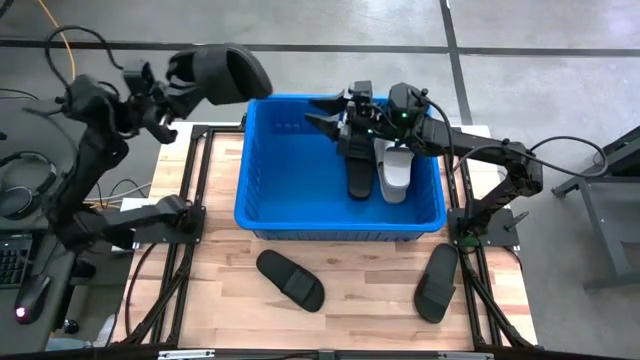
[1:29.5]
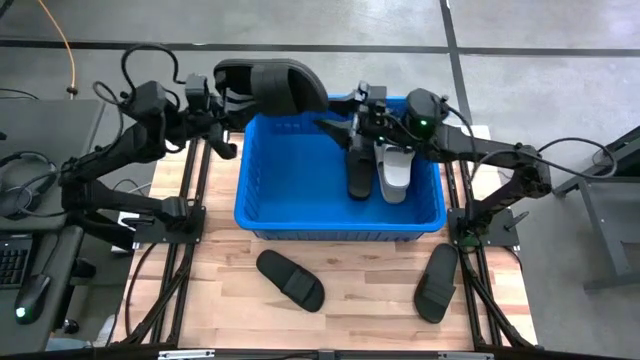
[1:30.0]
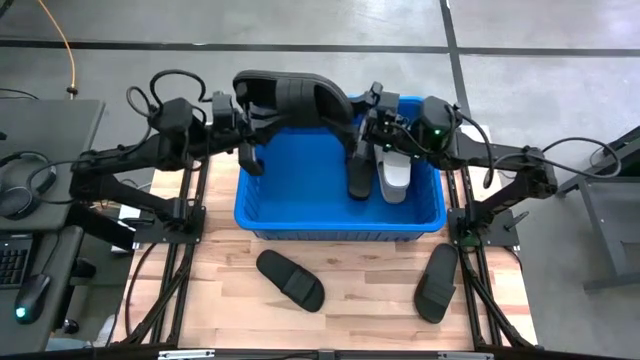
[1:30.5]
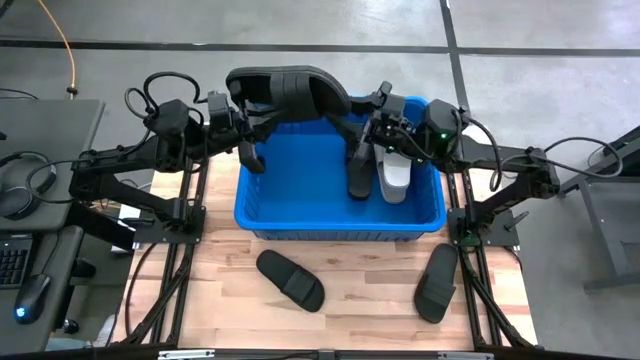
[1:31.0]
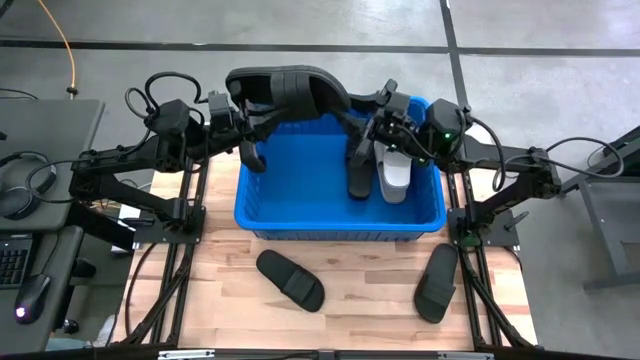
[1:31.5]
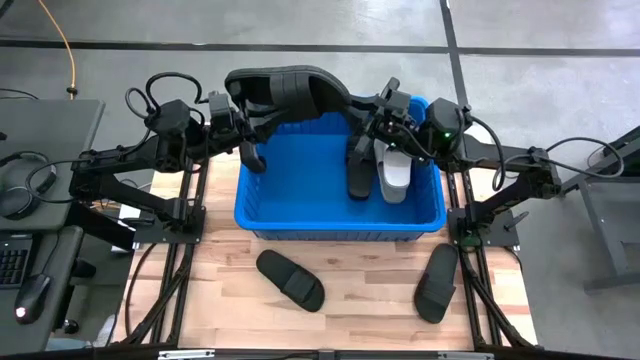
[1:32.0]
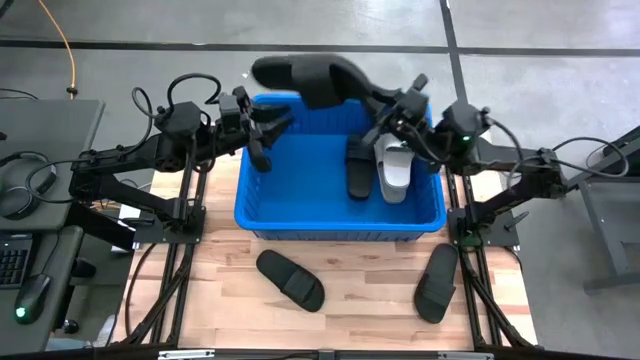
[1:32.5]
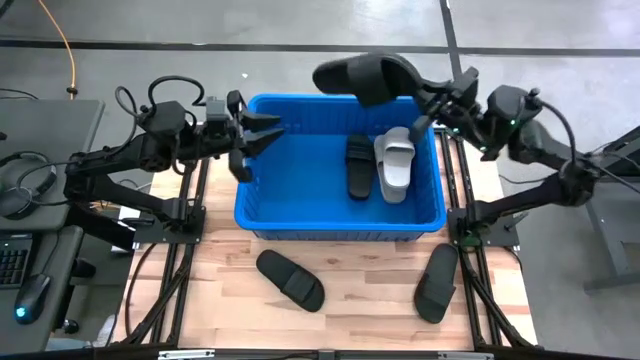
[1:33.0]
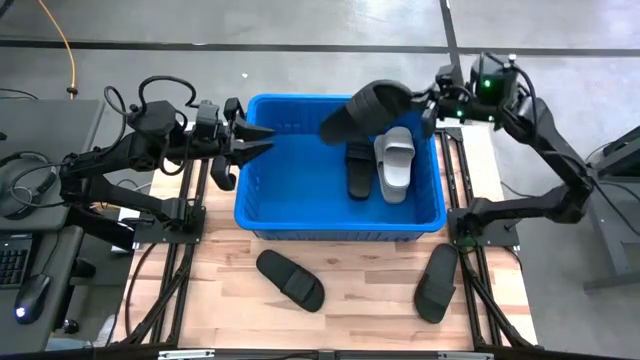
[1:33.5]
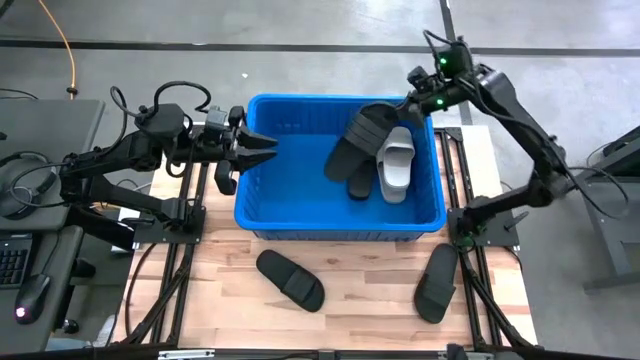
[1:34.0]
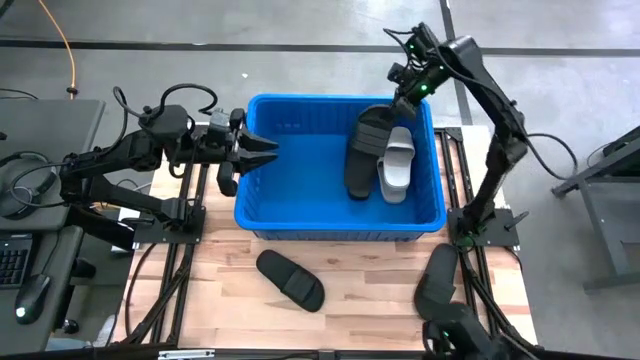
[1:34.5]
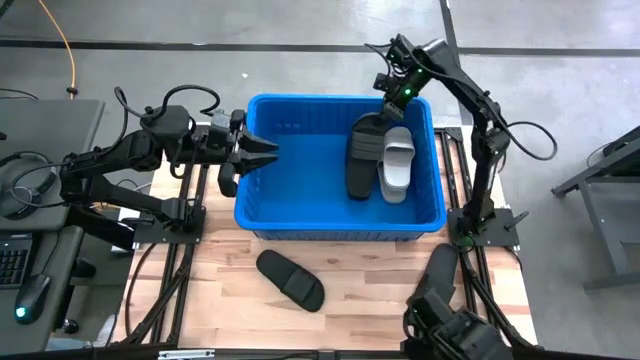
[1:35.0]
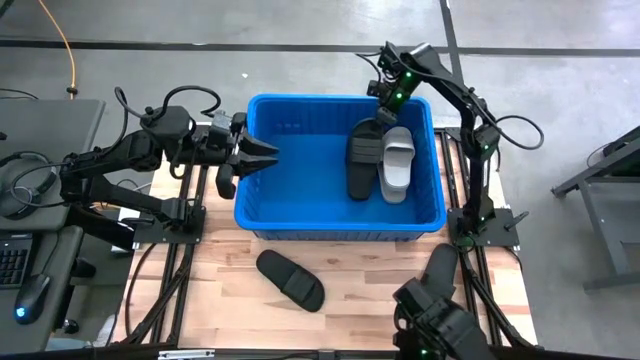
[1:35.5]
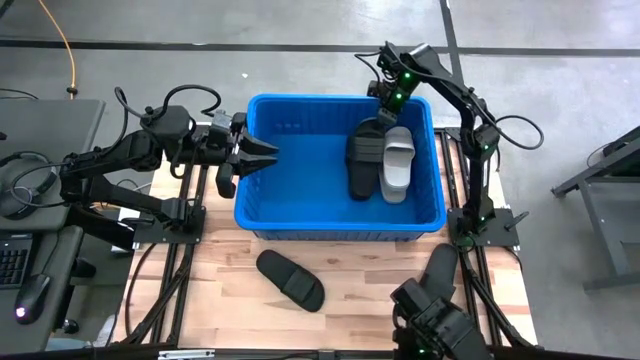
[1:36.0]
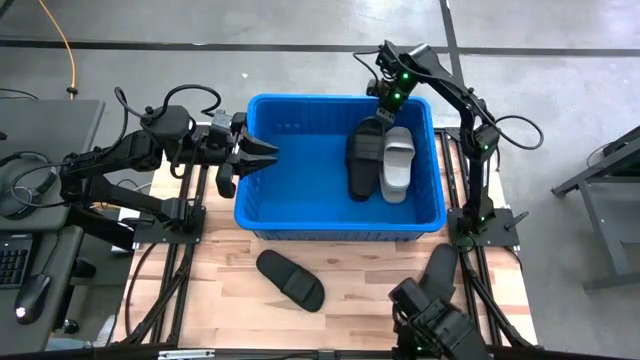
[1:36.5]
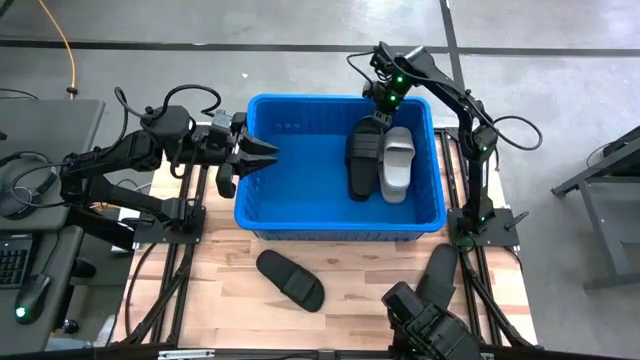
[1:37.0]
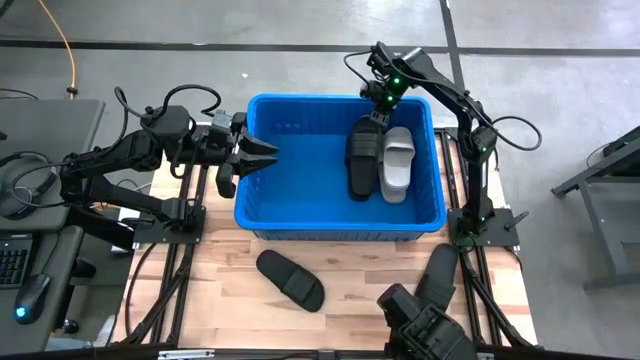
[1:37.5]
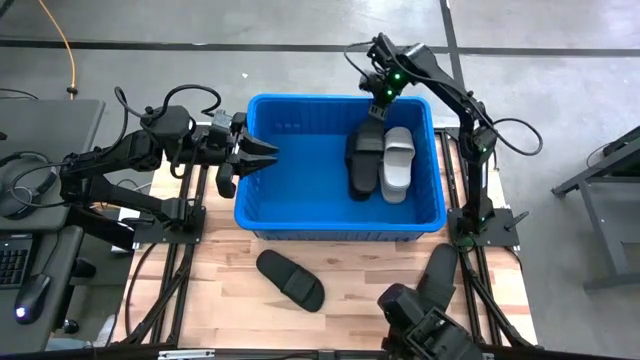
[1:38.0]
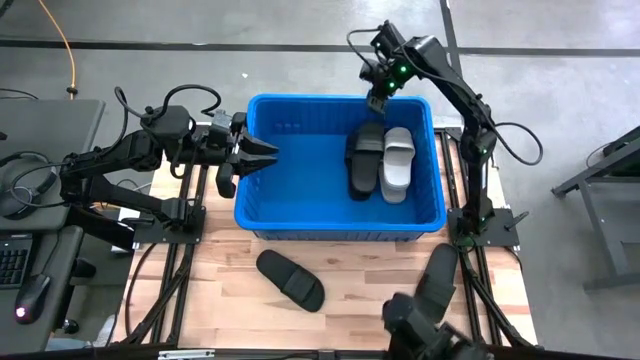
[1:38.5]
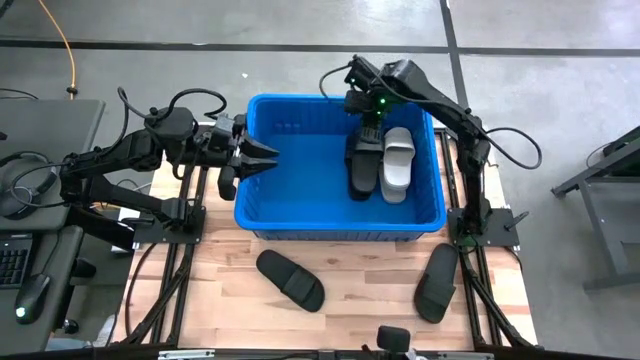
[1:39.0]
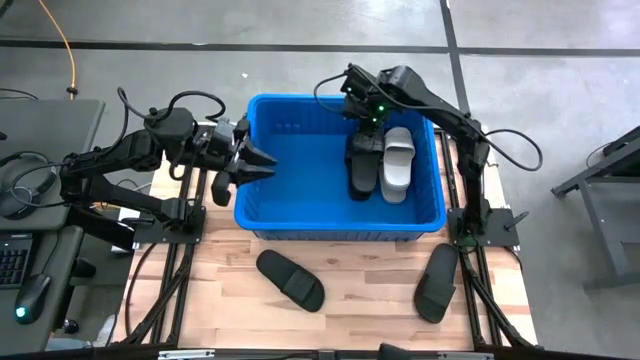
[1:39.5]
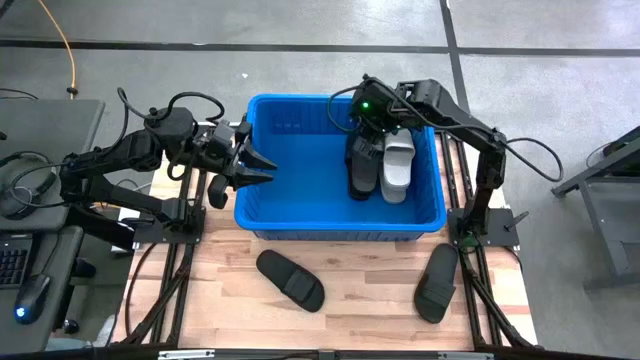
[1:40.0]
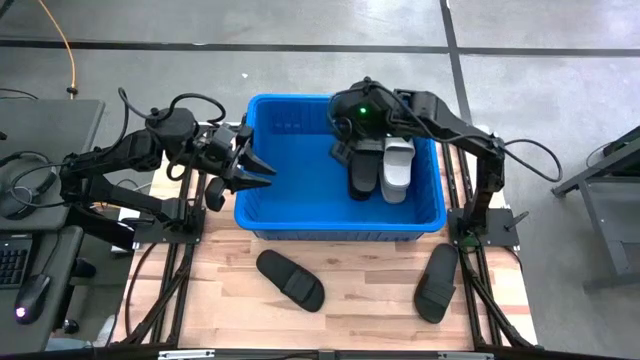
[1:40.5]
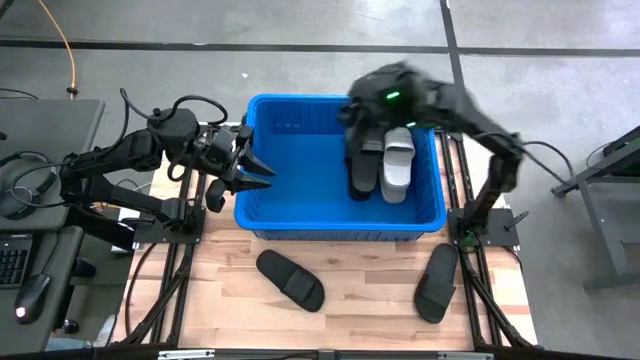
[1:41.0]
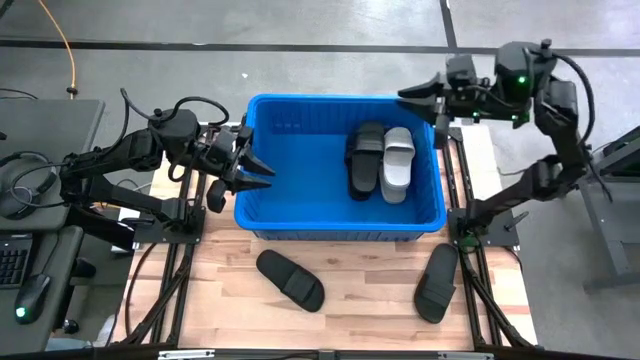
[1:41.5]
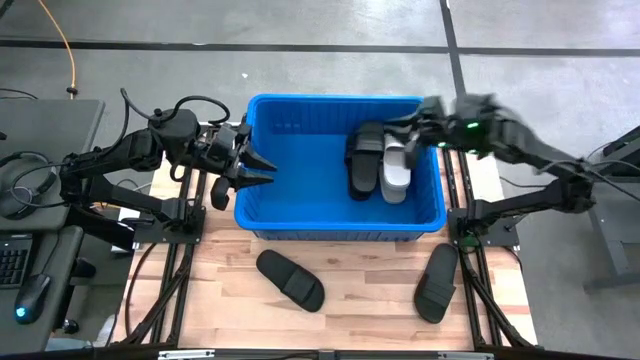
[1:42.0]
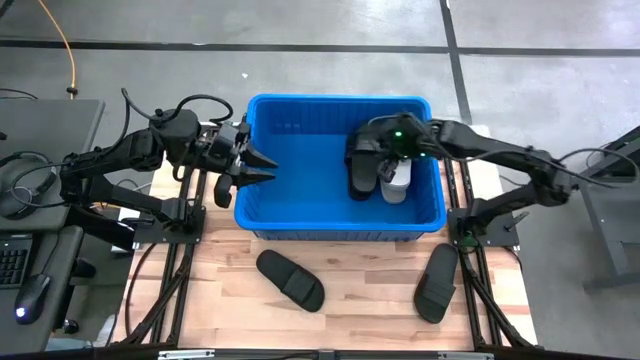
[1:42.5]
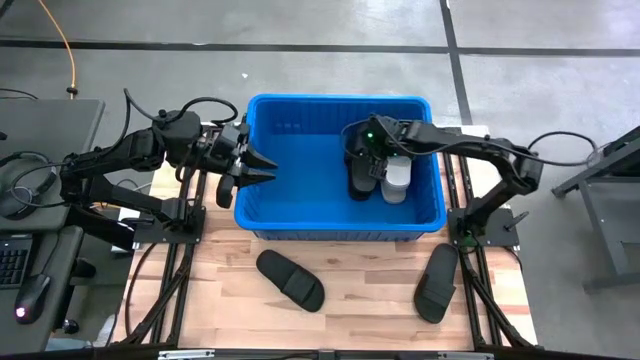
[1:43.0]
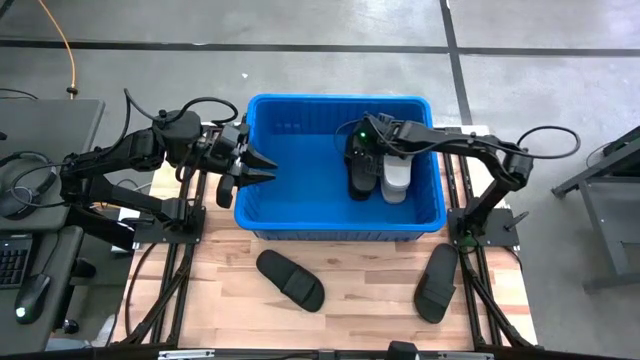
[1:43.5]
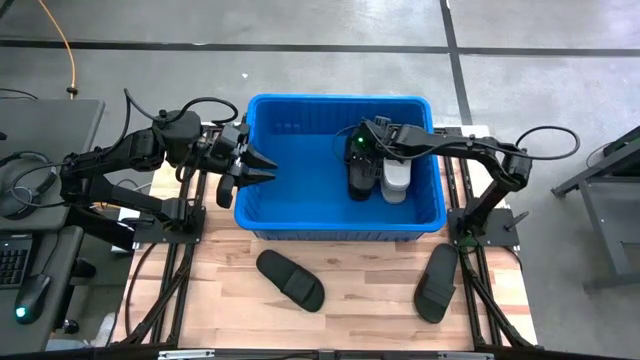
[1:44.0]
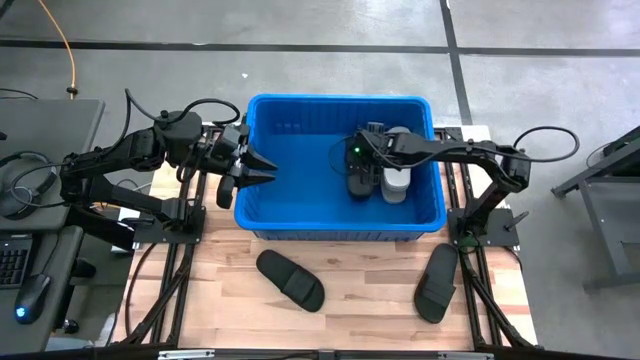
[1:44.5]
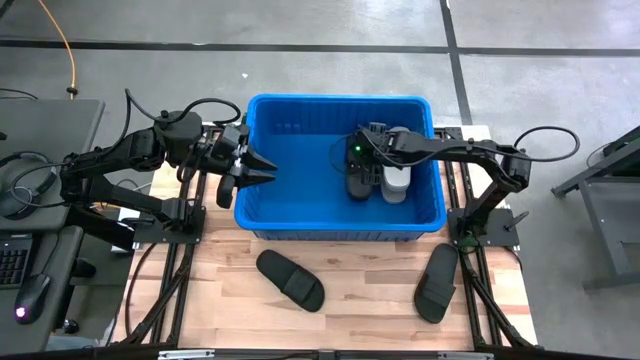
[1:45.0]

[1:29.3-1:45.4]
Task: Pick and place slides into bin
Put the left black slide into the blue bin

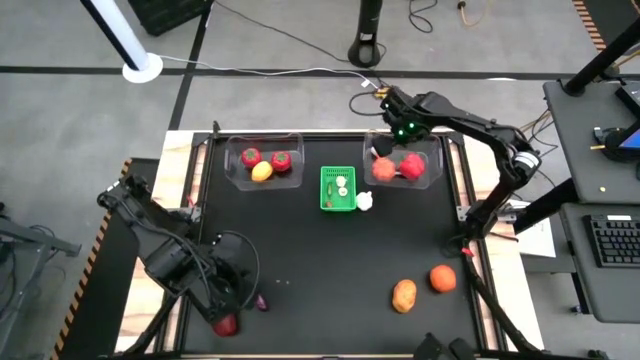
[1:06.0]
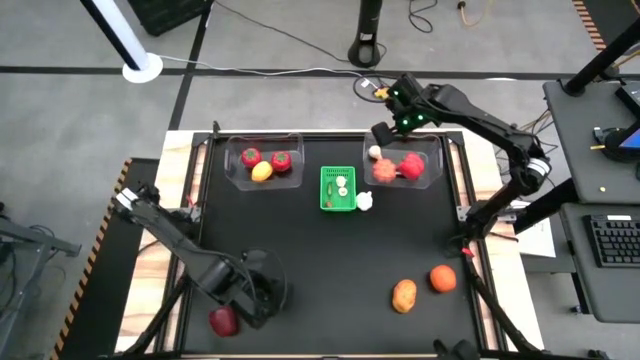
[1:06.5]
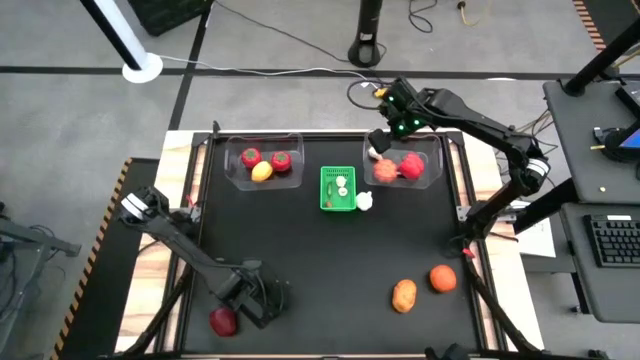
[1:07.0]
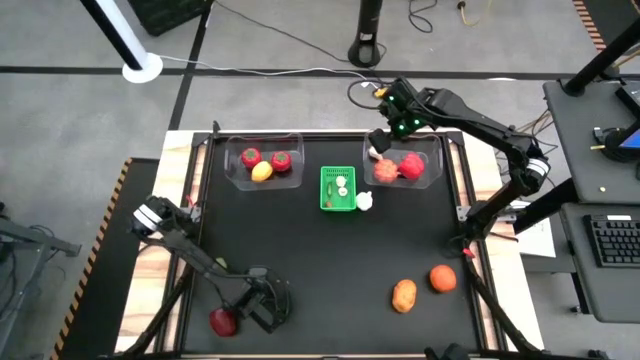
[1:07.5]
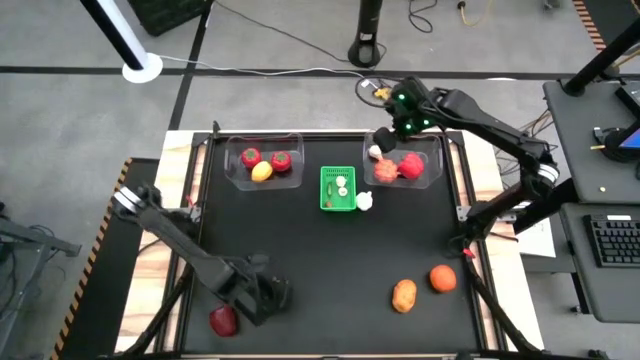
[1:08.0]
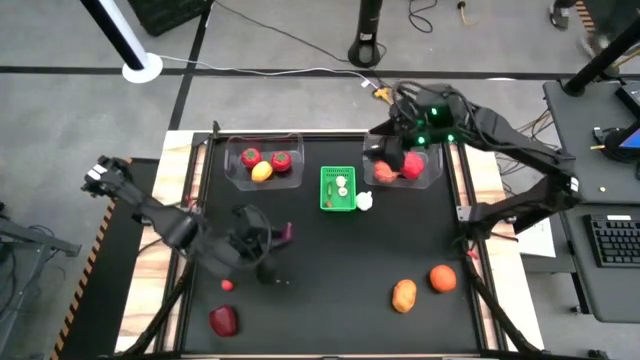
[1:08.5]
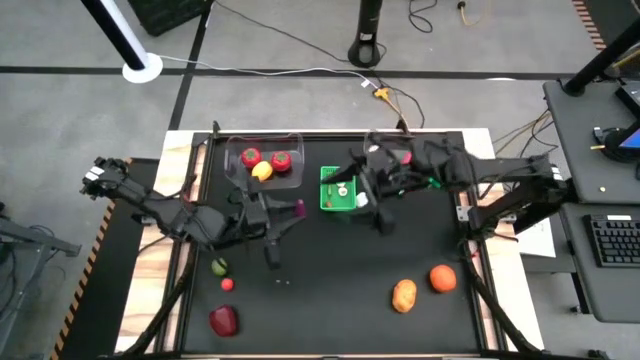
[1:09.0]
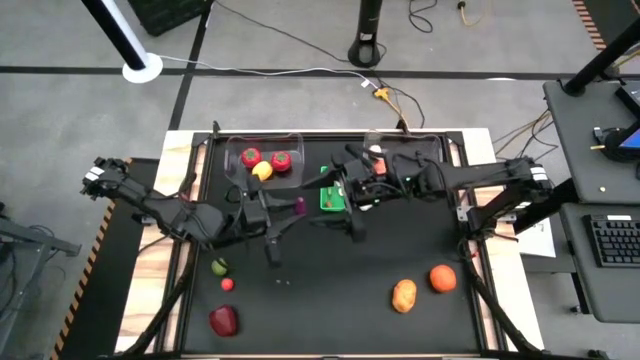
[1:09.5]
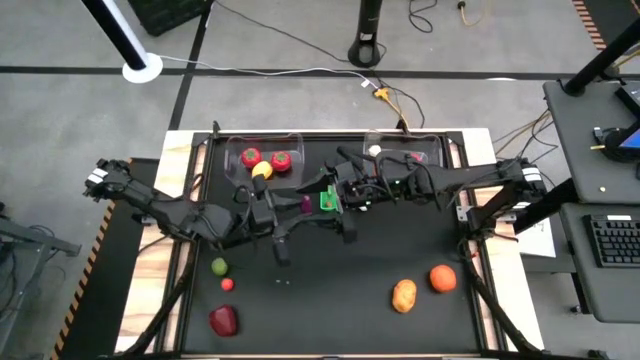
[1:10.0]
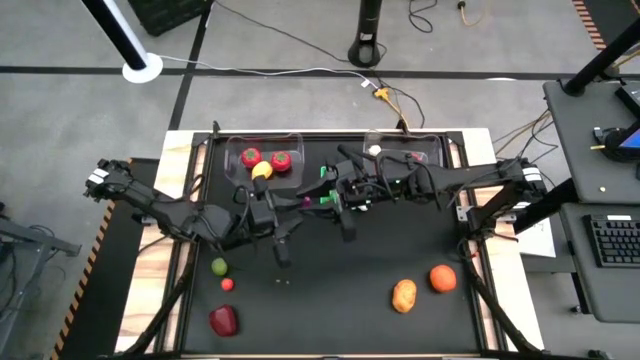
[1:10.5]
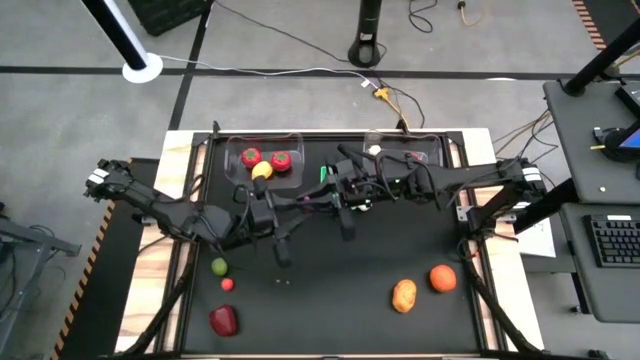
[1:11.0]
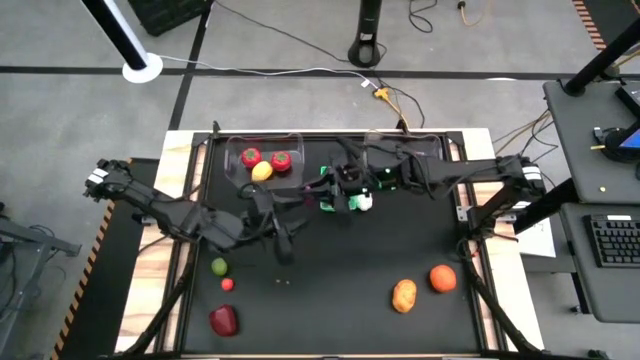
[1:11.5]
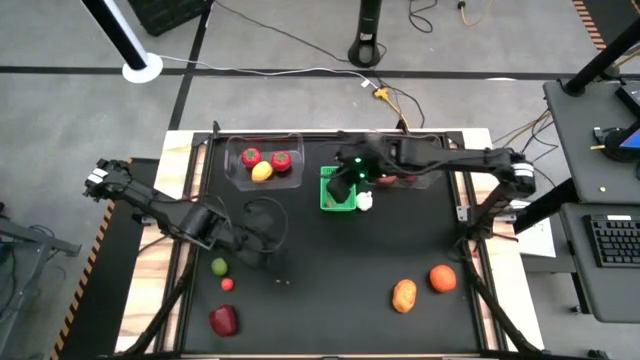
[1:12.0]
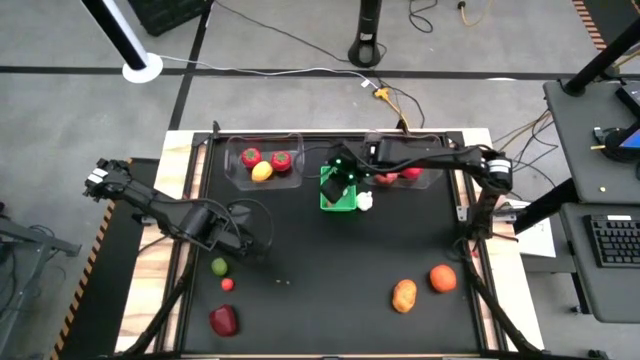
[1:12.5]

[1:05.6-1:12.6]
Task: Sort produce into baskets
Put the eggplant into the green basket
